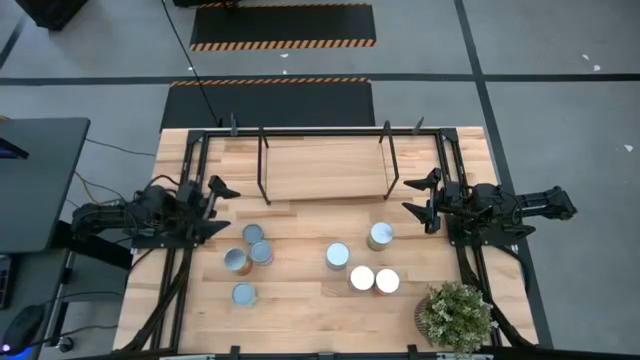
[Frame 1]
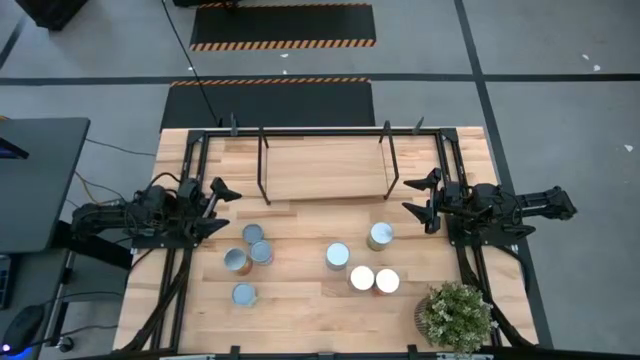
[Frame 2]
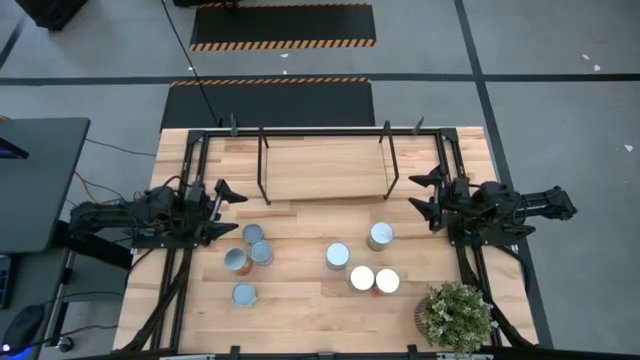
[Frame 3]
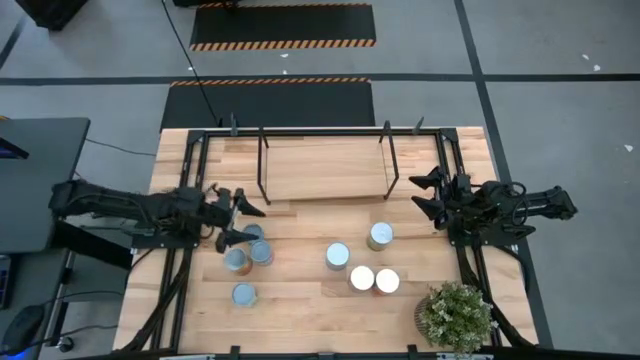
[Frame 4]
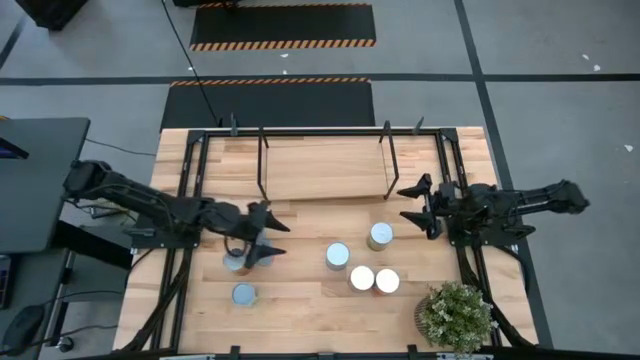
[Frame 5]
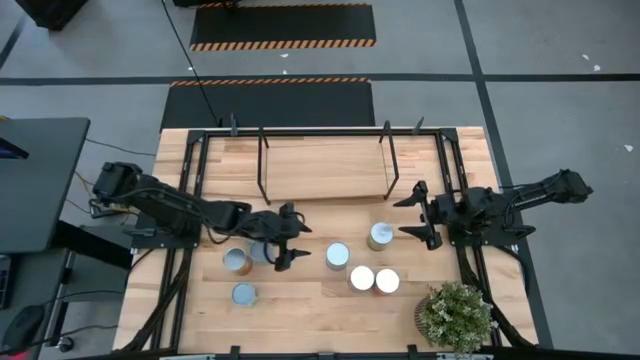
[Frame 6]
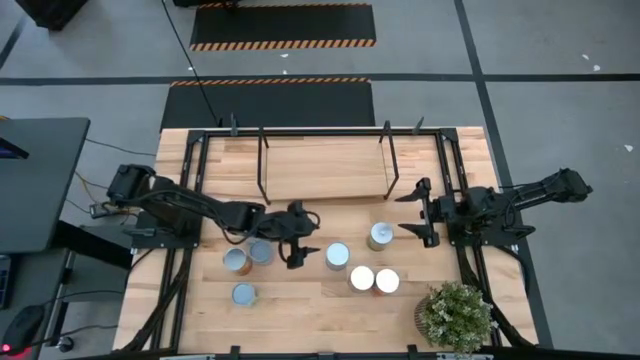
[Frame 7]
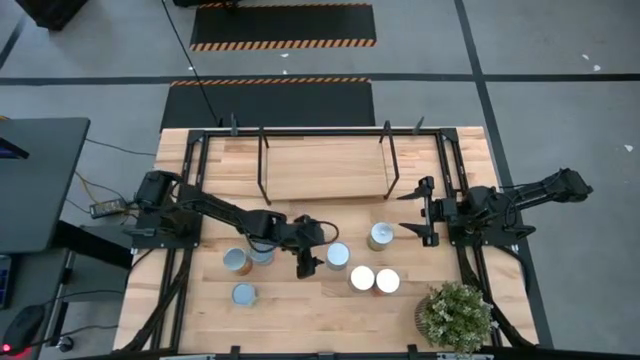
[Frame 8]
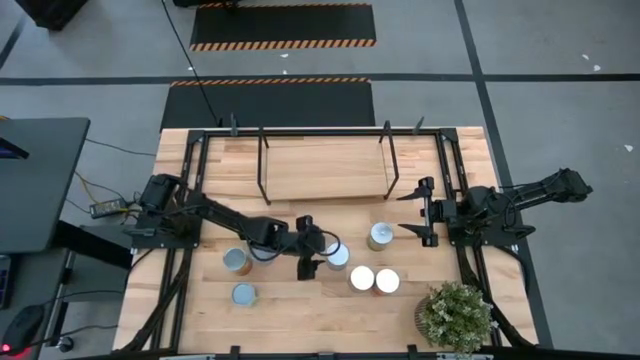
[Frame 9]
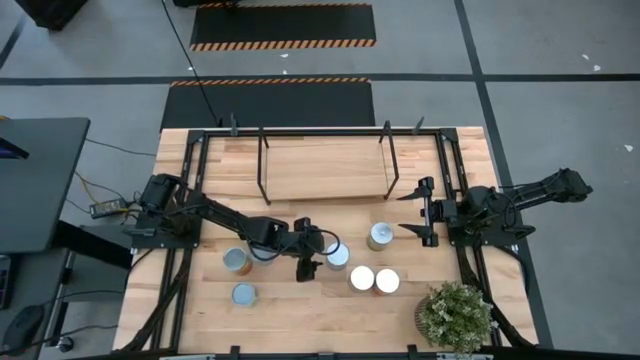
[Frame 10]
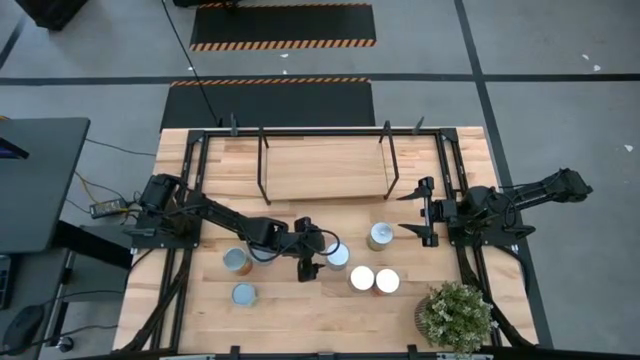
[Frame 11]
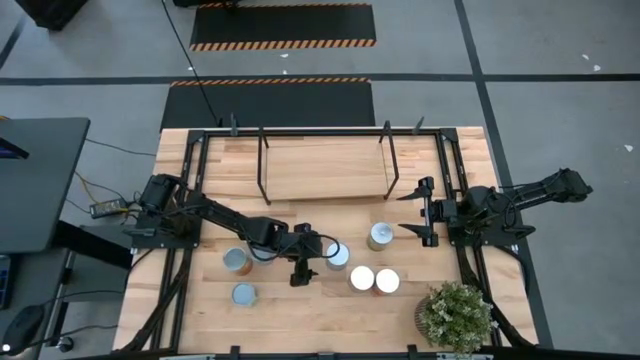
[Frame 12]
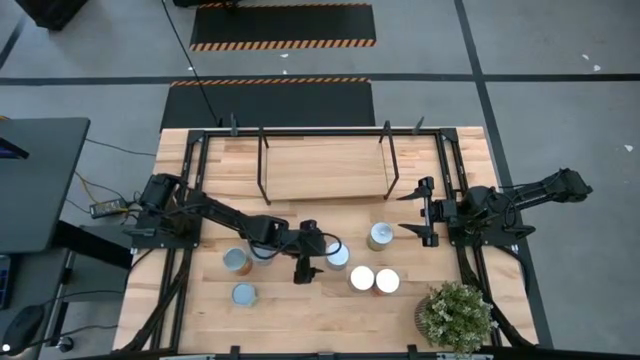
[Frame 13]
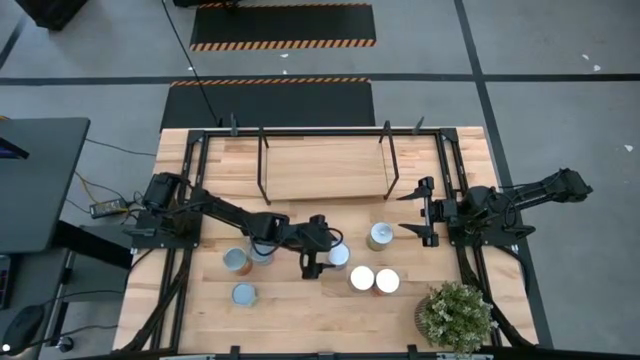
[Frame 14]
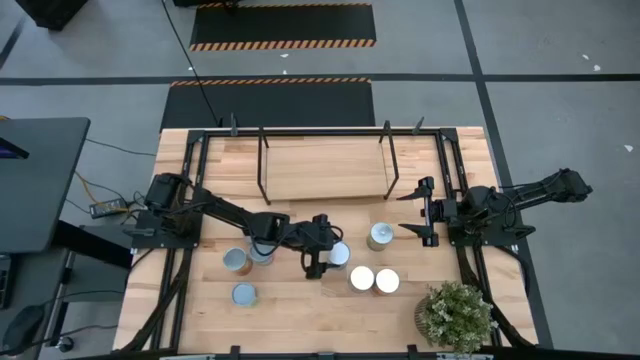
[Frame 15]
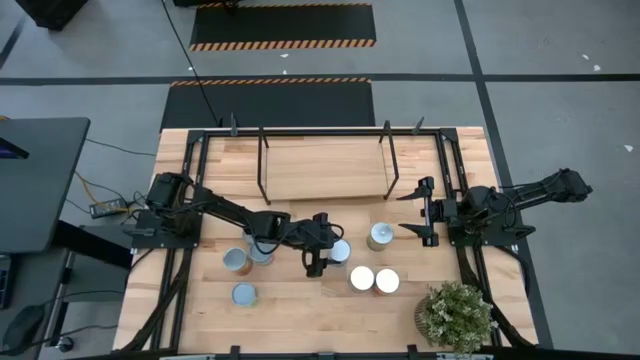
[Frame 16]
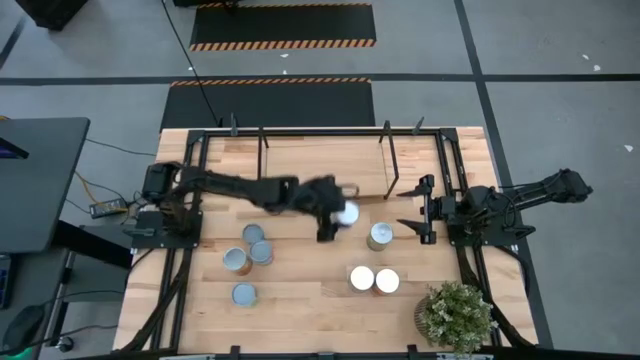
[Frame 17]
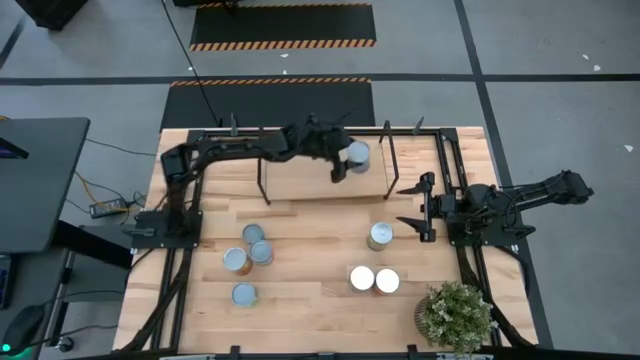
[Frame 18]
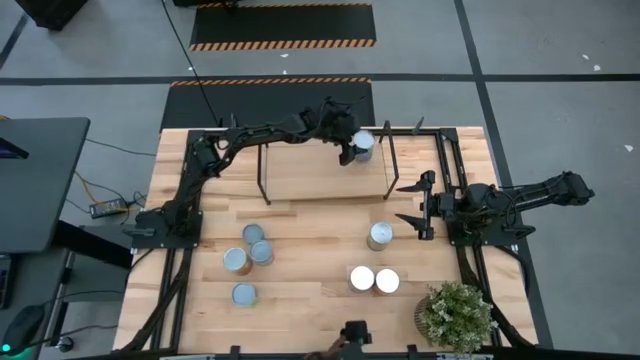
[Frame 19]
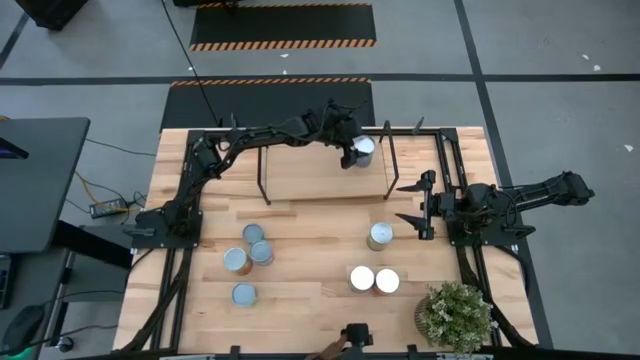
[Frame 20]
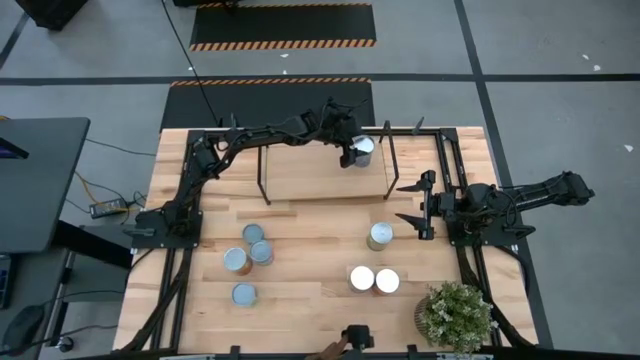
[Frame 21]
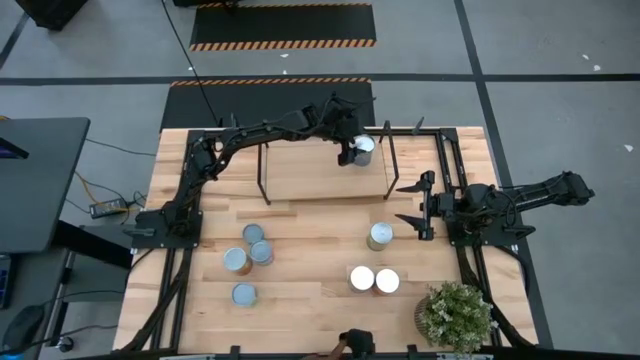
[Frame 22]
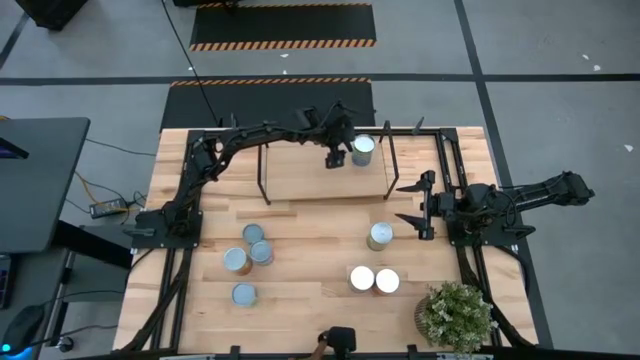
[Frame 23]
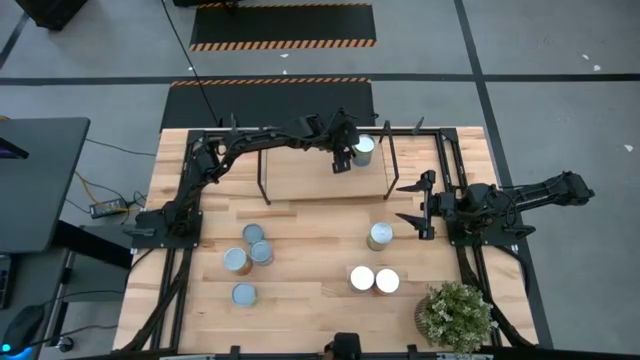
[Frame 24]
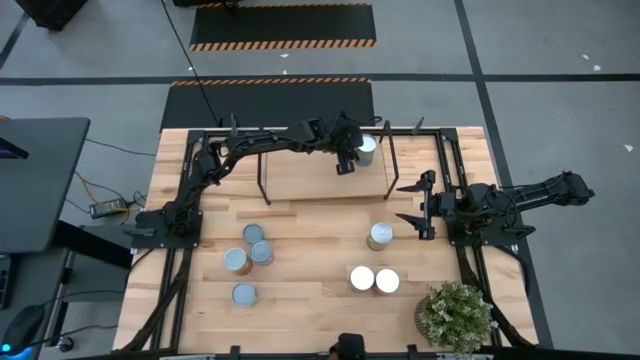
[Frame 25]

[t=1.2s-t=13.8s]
Task: Pick and place cans onto a shelf
Put the canned cherries on the shelf

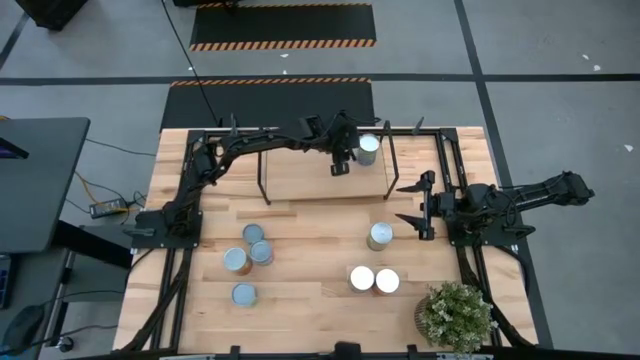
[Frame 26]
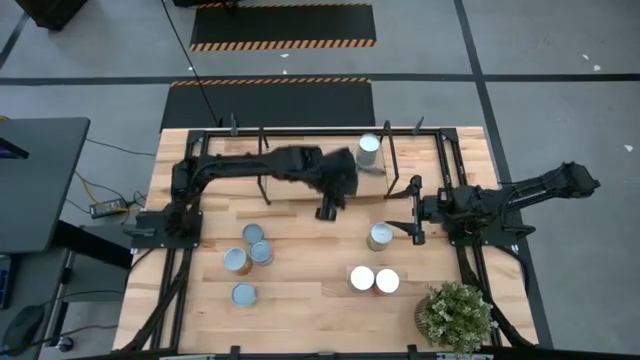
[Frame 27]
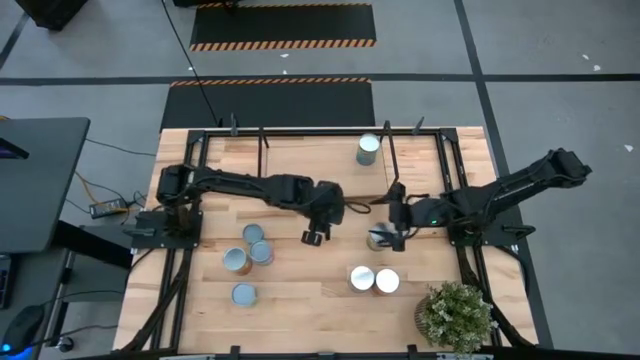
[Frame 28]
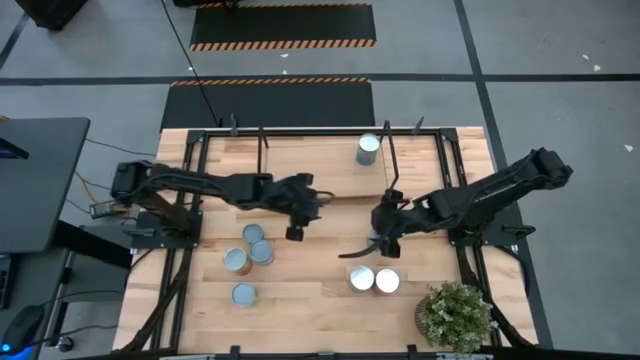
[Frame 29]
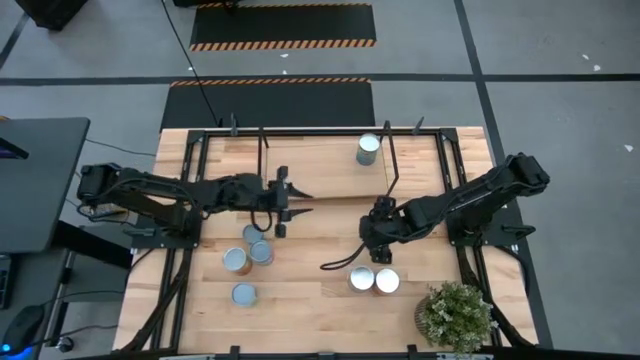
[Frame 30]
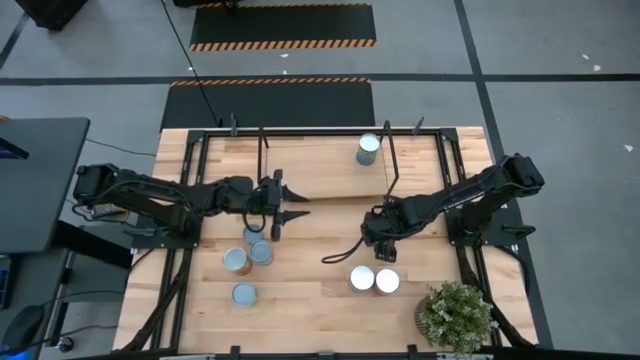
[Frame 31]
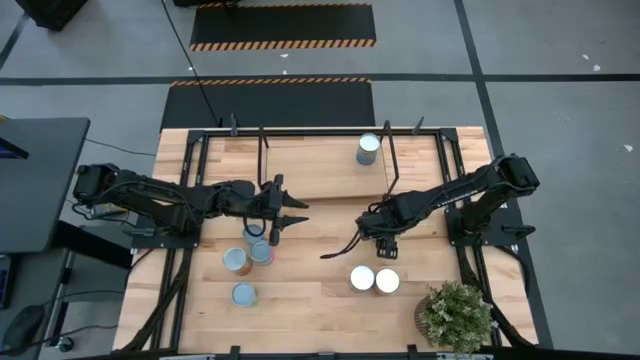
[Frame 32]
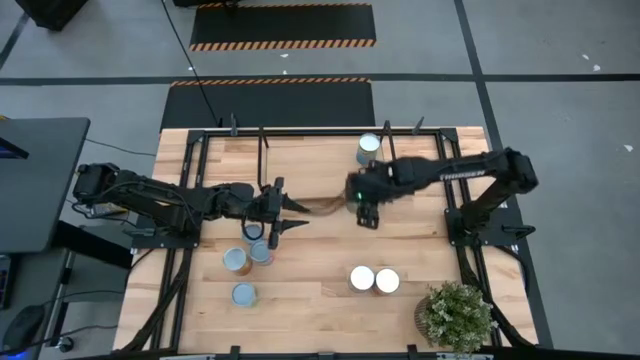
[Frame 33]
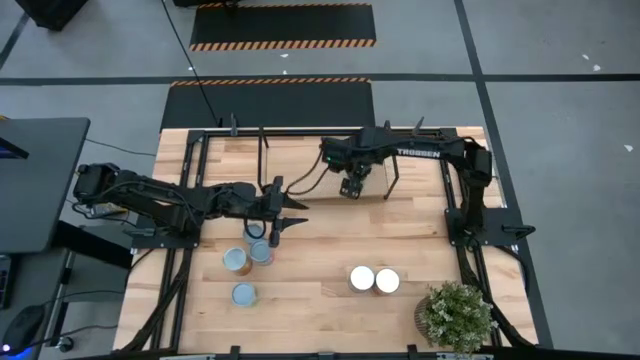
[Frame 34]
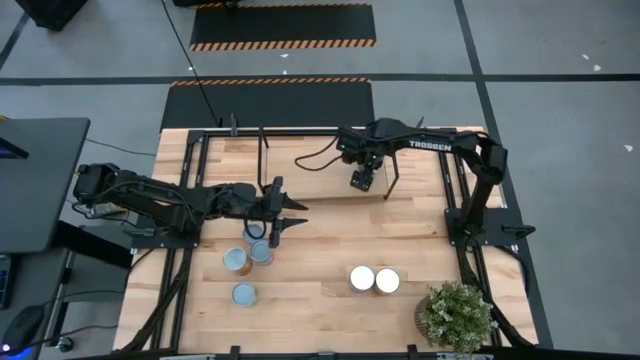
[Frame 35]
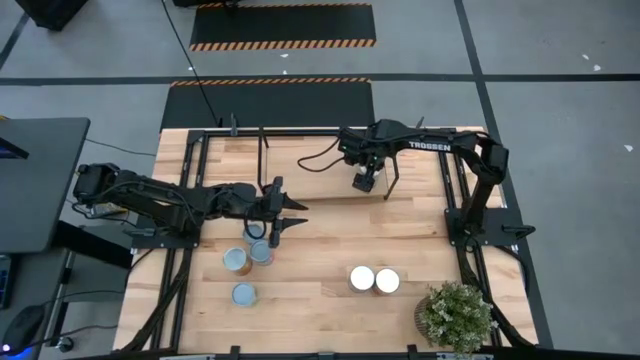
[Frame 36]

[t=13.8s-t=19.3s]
Put the canned oranges on the shelf

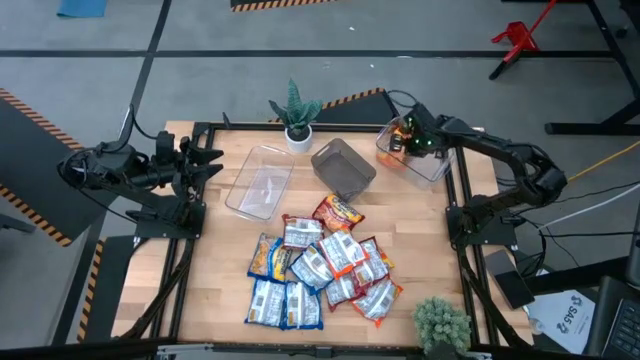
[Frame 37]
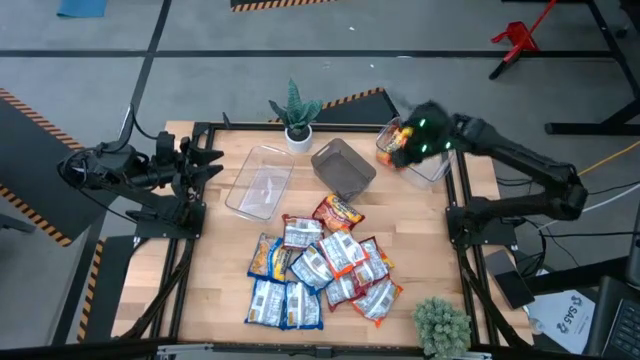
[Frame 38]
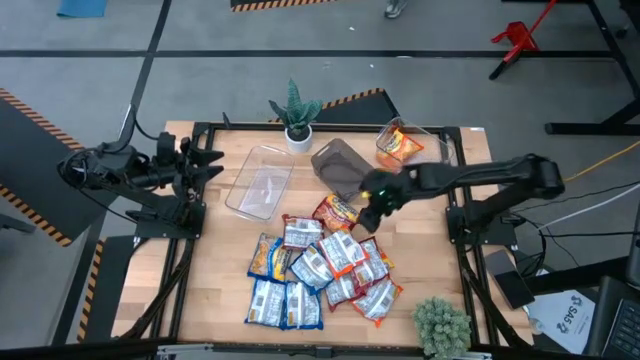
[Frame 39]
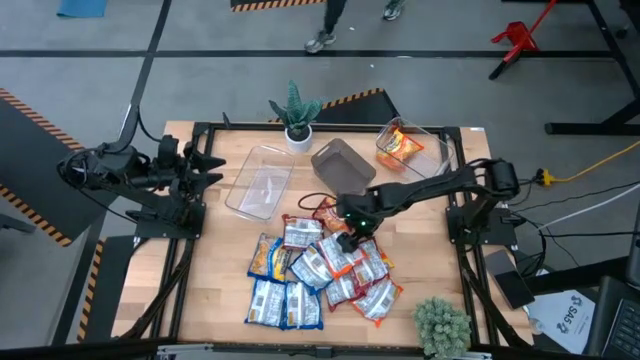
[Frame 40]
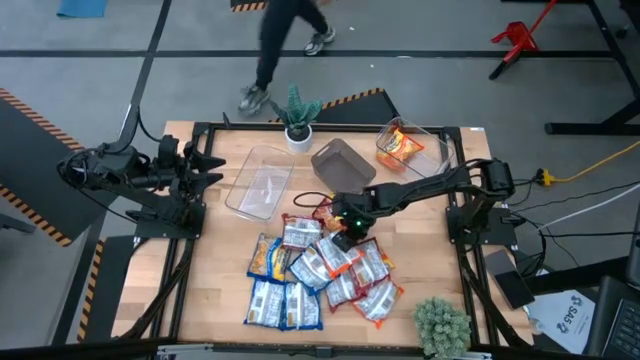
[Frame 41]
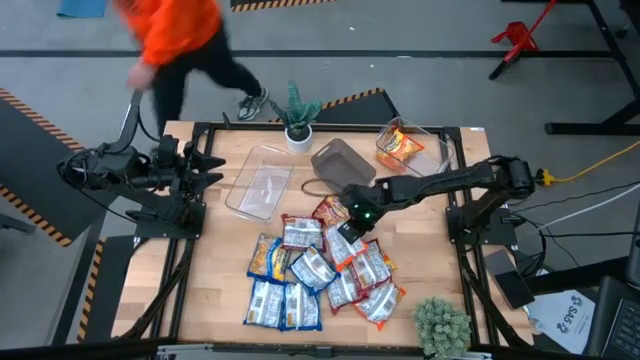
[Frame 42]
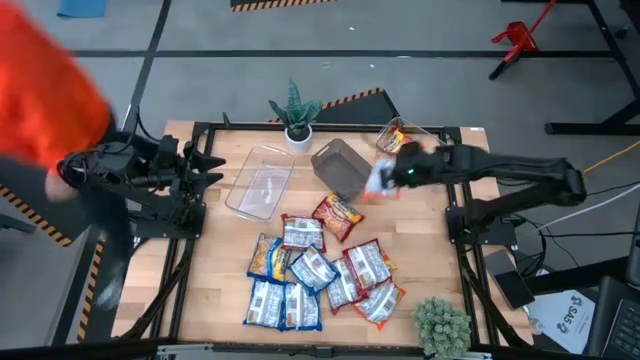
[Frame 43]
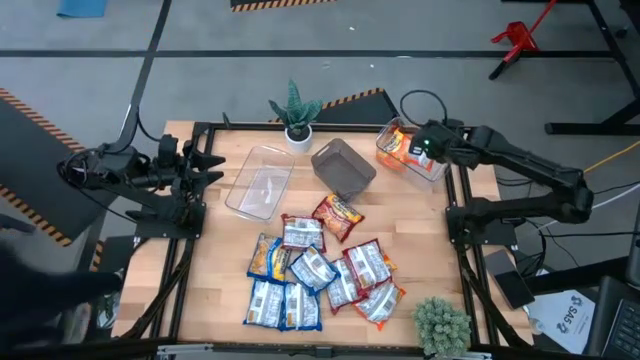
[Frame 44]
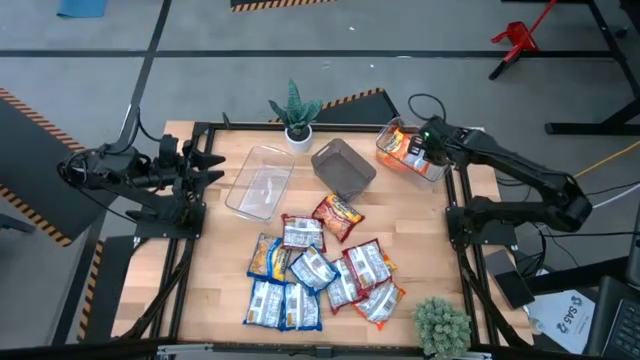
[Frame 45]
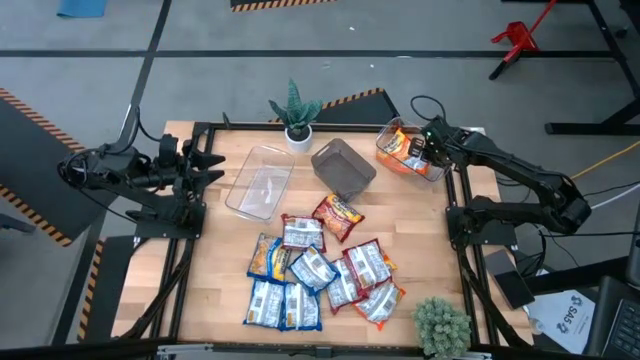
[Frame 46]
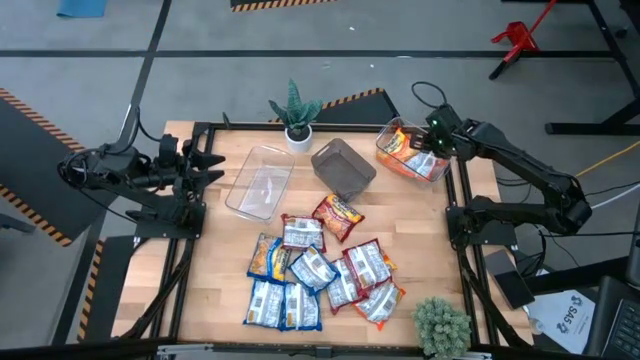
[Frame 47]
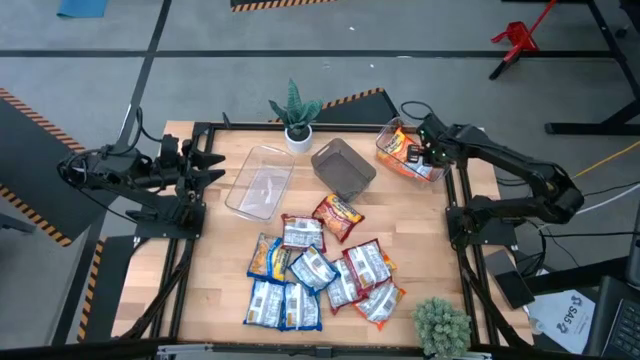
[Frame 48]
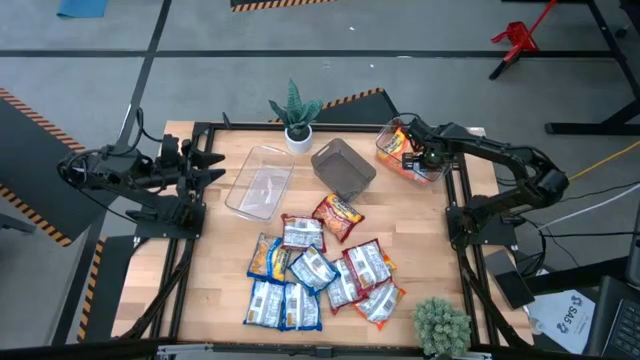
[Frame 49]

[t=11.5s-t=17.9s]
Task: Sort Maruchan noodles
Put the orange noodle pack into the right transparent bin
